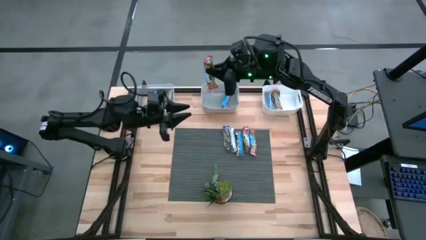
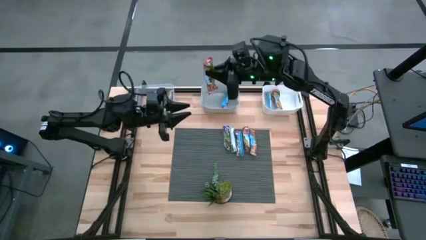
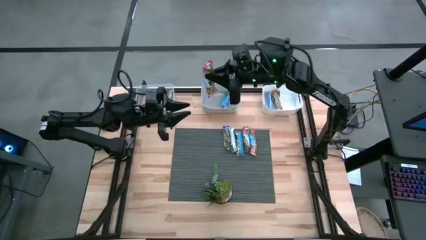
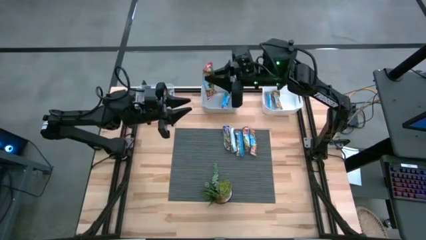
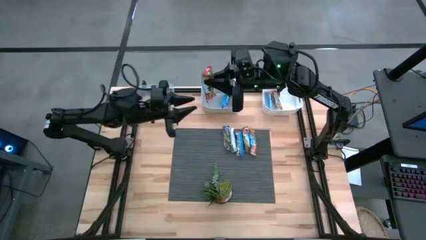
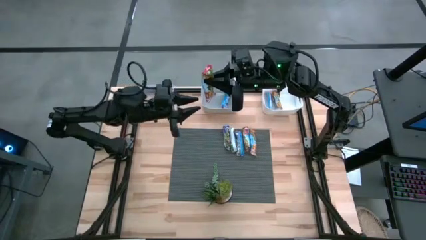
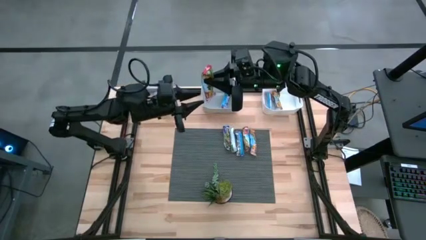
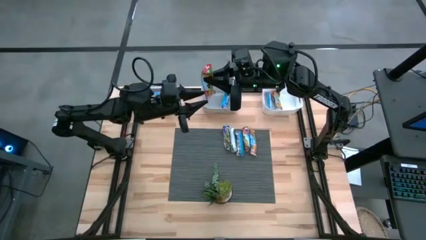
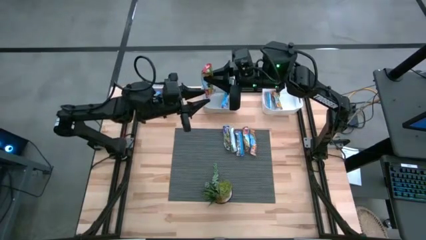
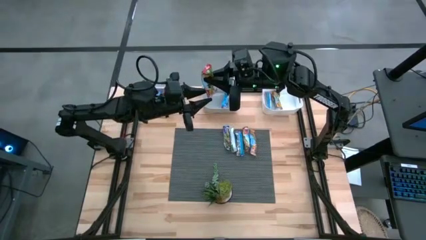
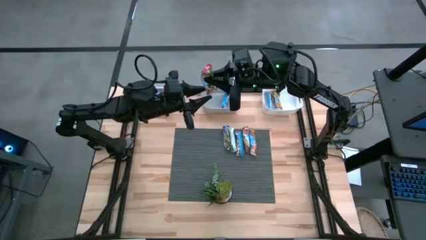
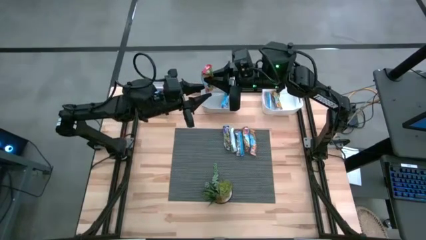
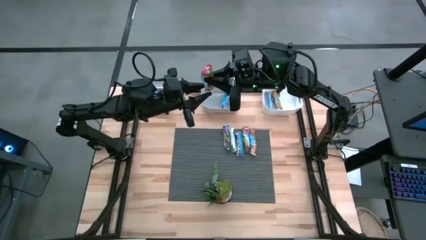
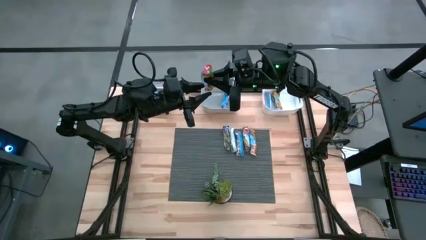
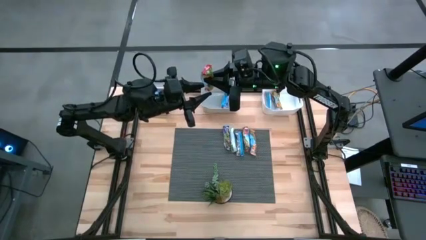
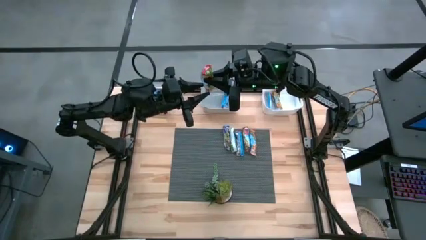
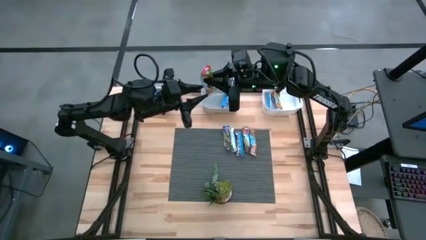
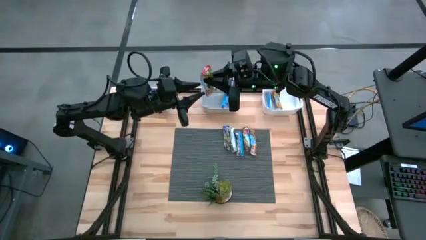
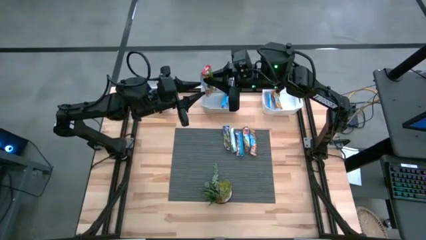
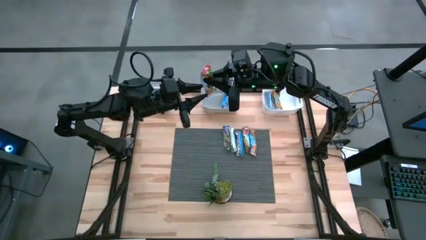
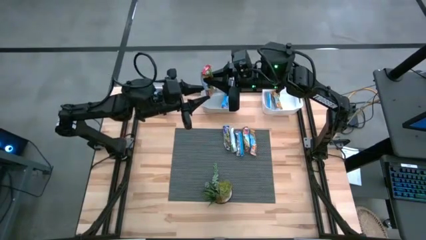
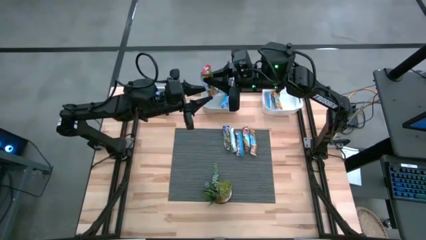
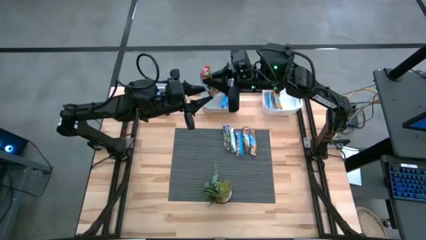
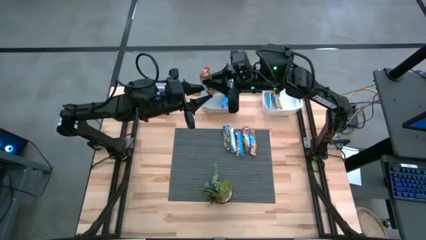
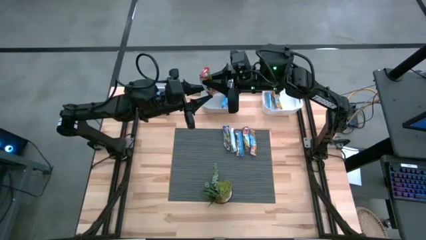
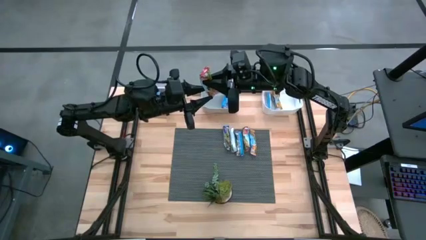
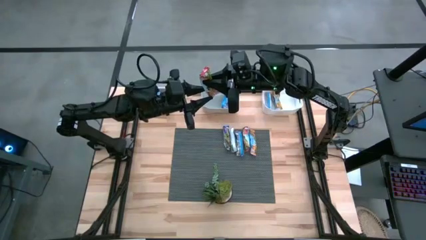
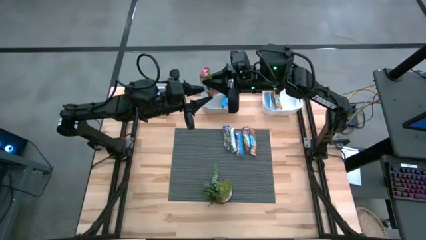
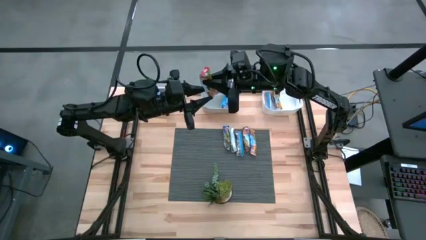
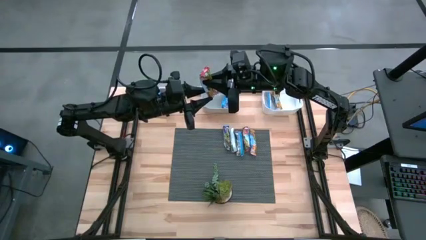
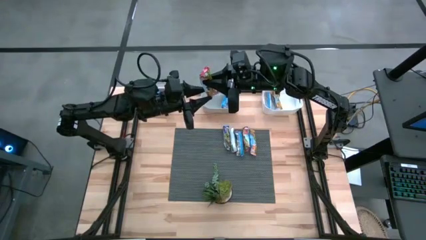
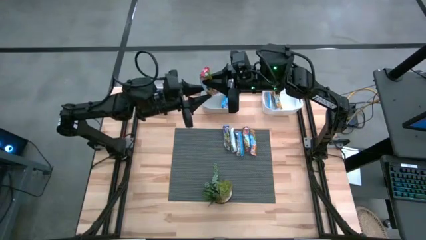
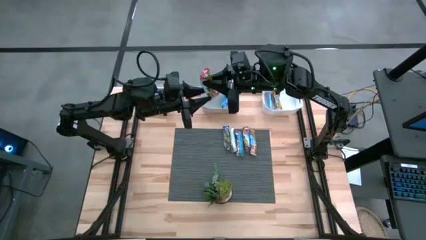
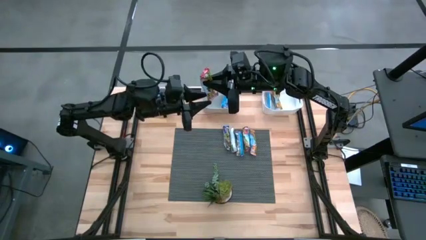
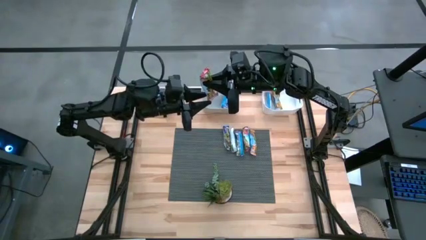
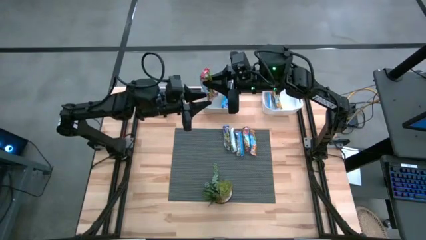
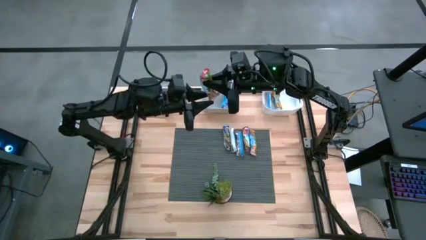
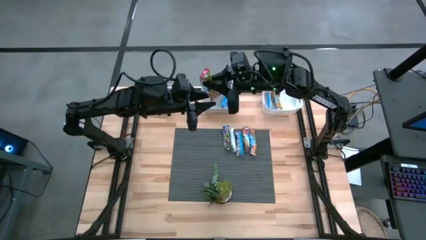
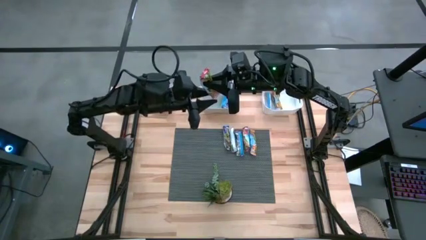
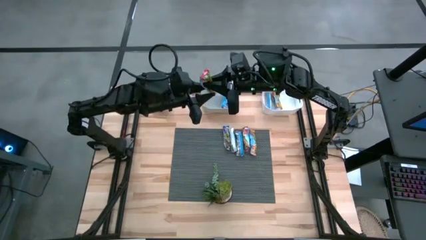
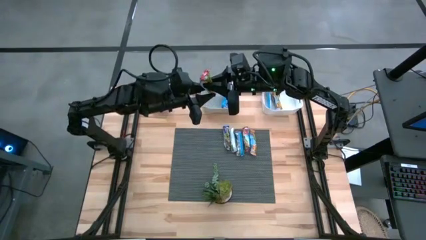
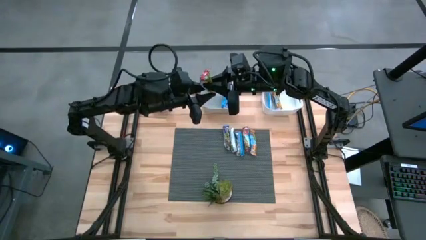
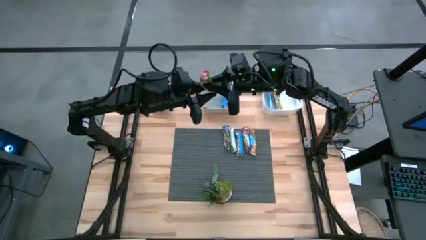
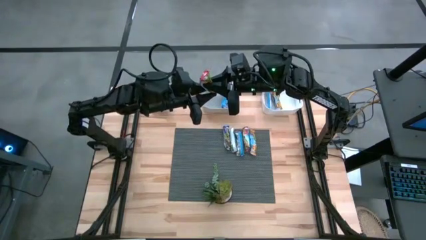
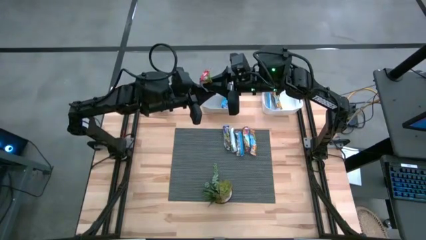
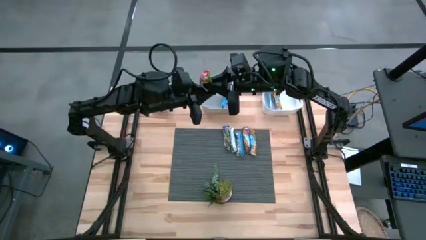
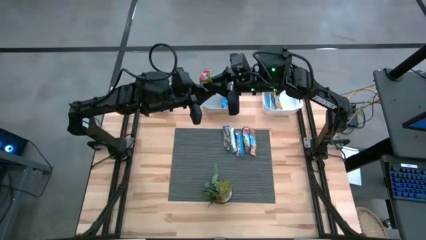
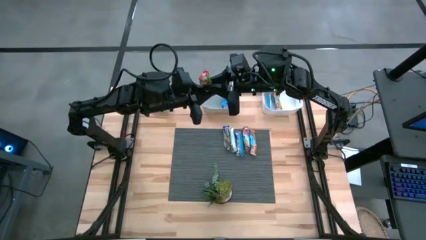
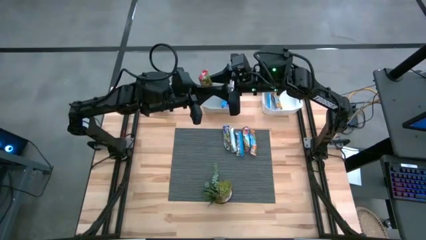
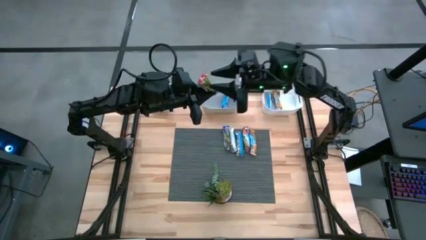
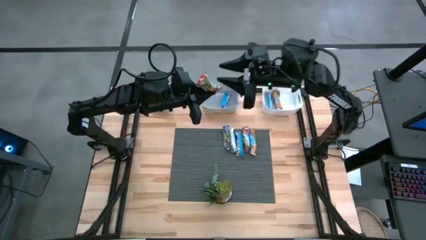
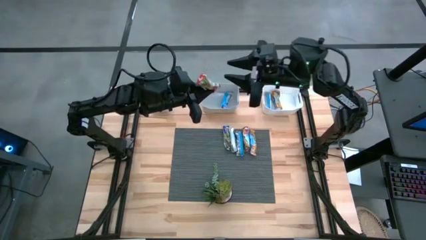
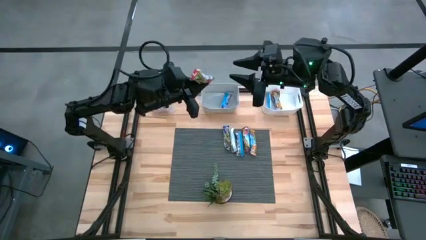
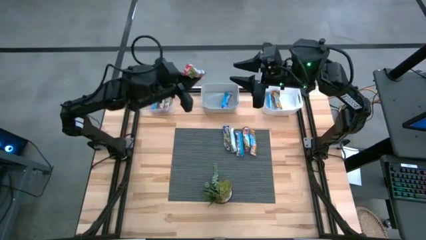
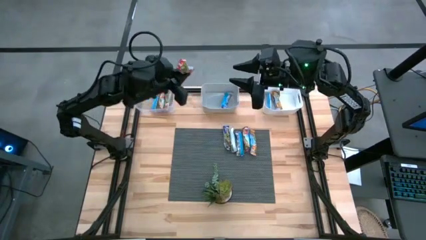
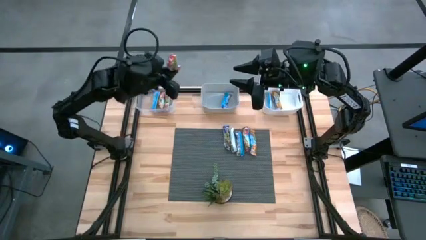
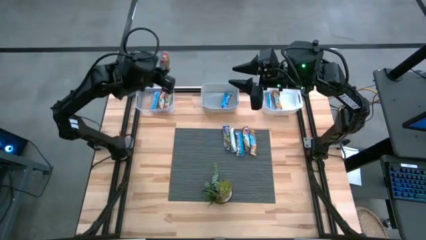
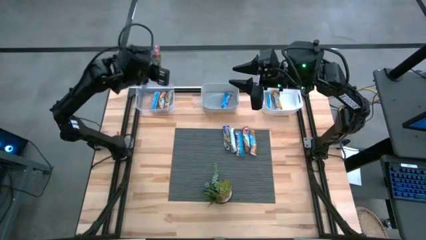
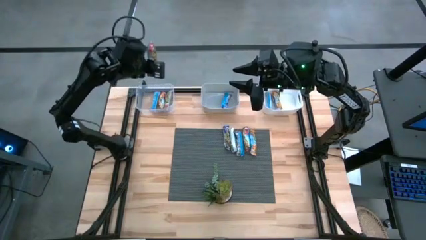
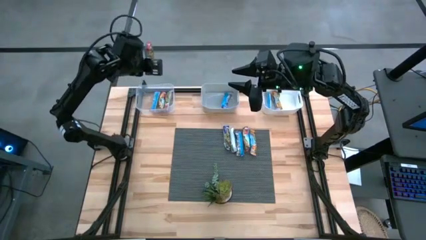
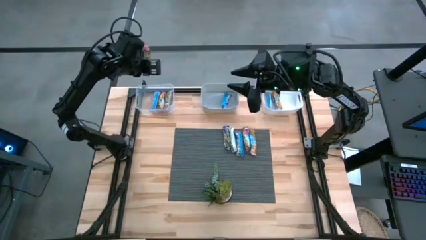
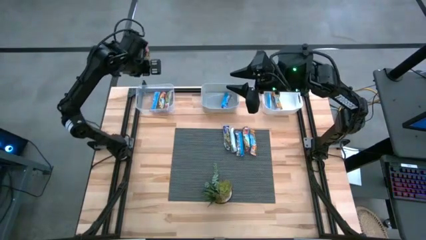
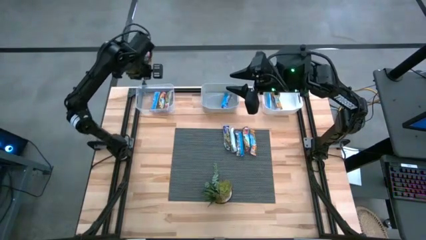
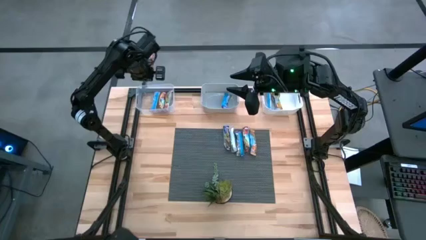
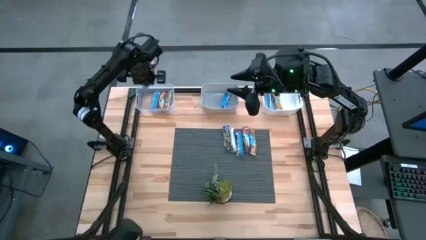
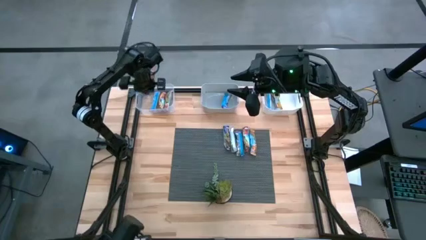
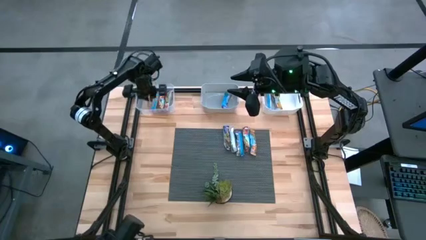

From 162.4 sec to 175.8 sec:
Task: Pick and place Granola Bars by type
Put the red granola bar into the transparent bin

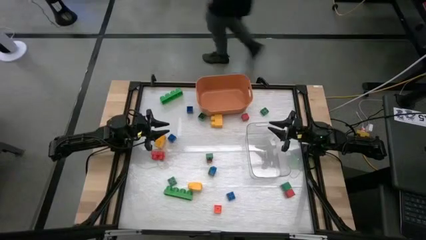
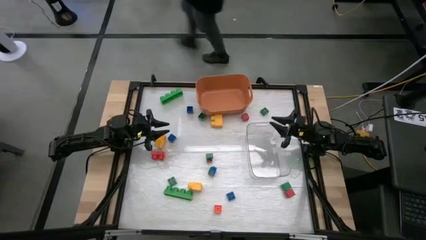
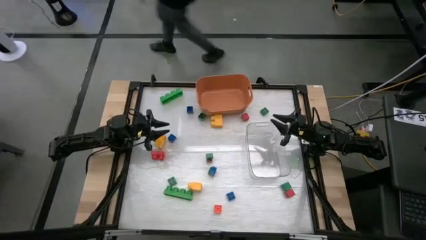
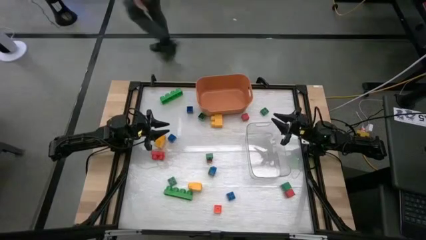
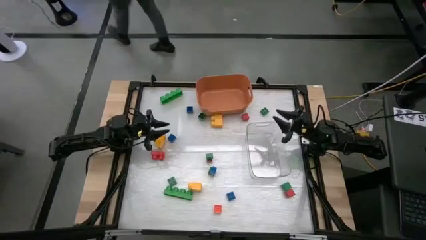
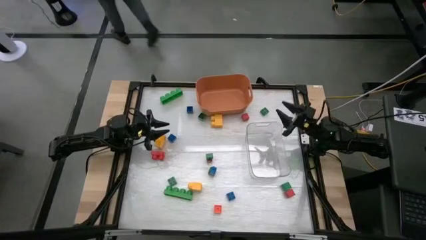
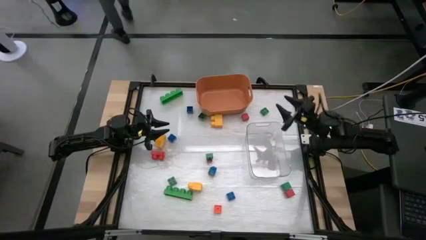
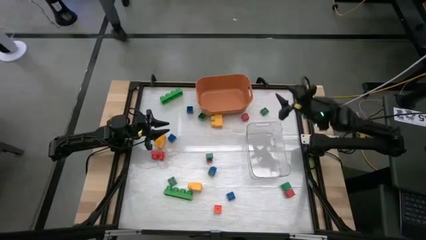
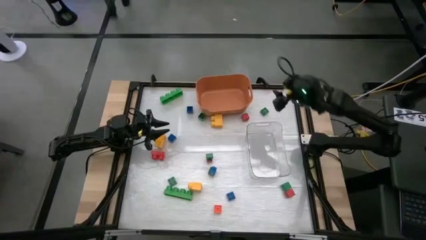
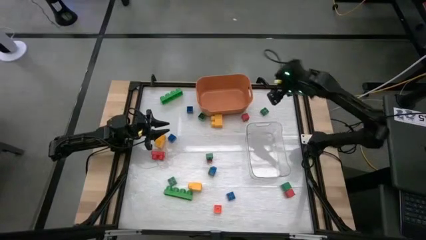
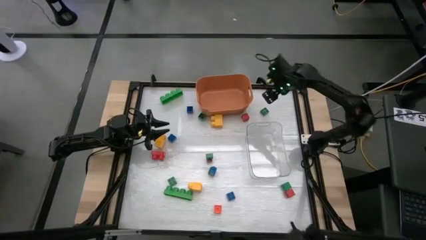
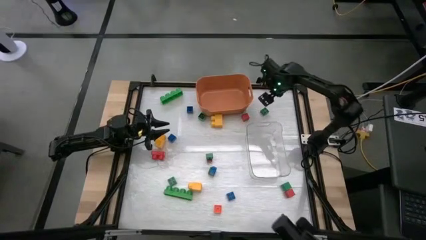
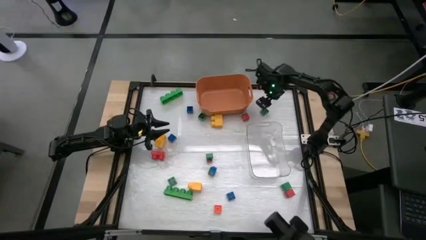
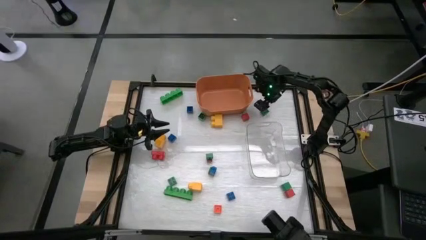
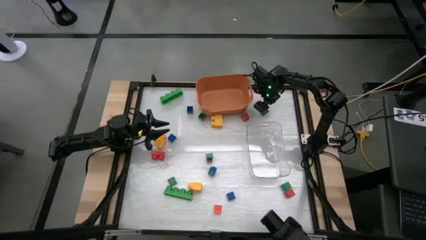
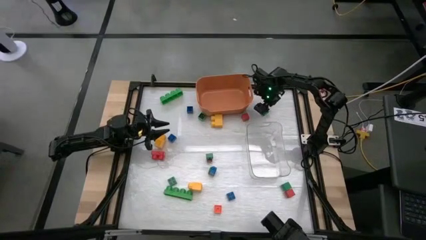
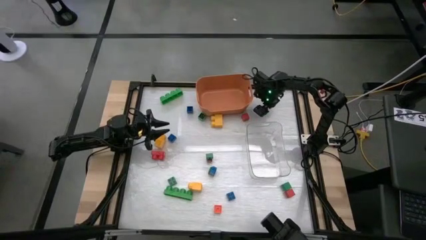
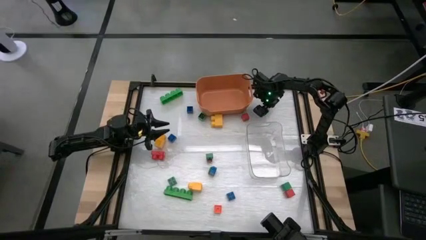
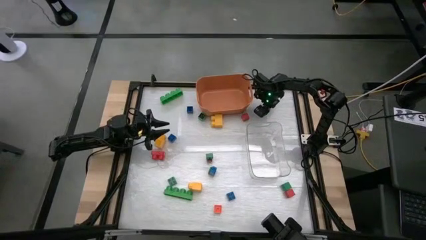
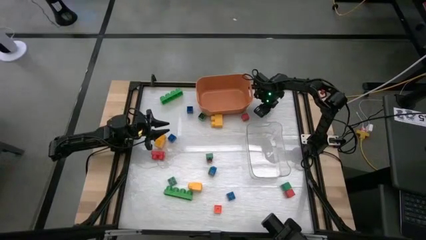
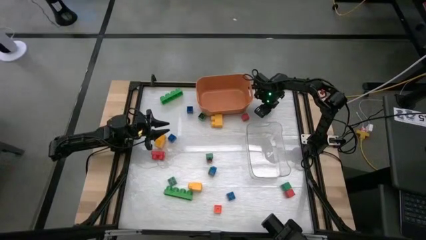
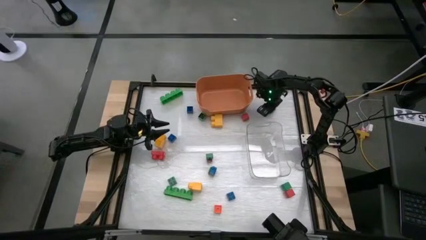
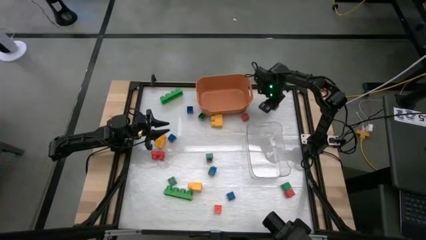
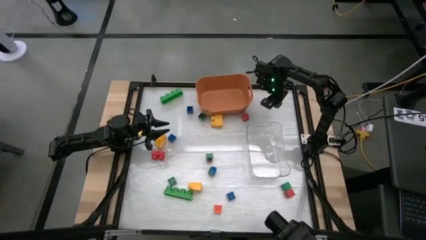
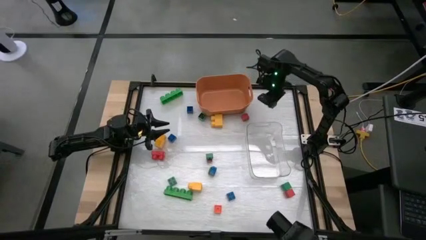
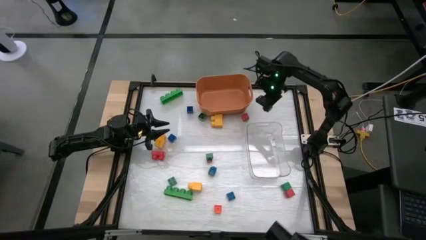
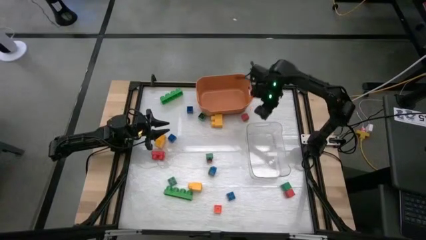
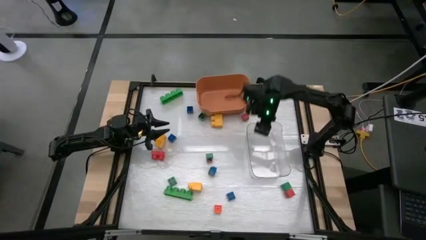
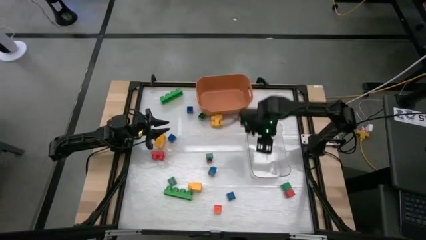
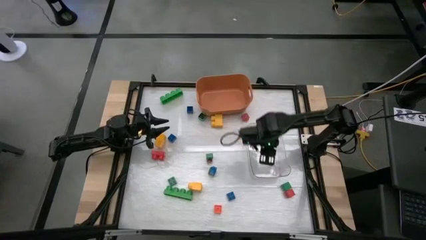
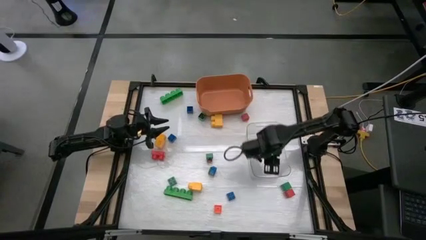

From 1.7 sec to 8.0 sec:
Task: Sort blocks by size
Put the small green game piece into the transparent bin
